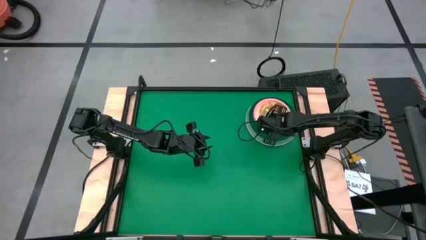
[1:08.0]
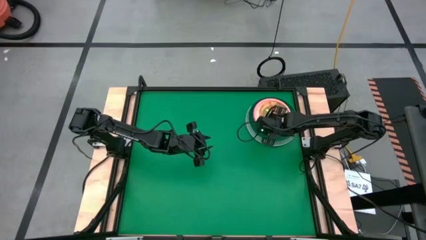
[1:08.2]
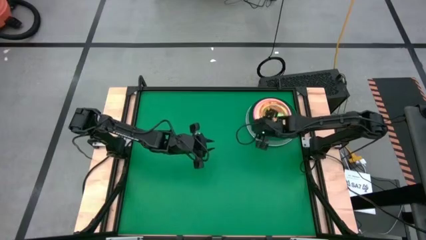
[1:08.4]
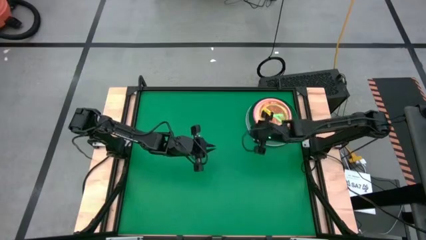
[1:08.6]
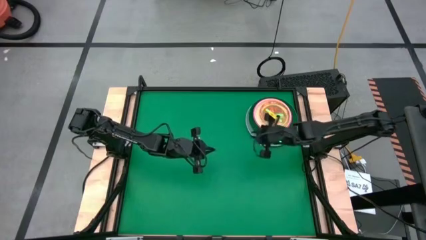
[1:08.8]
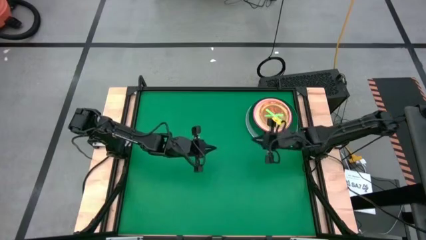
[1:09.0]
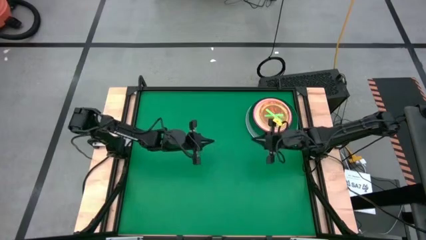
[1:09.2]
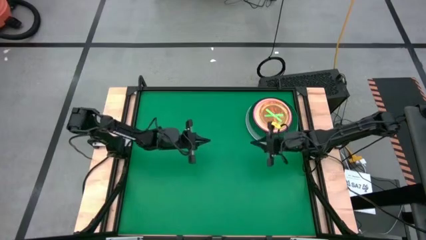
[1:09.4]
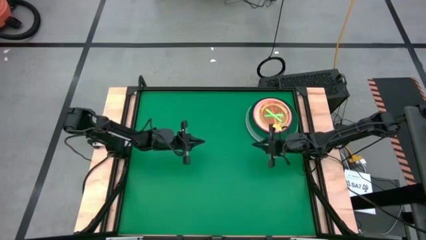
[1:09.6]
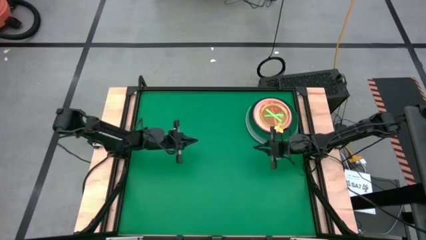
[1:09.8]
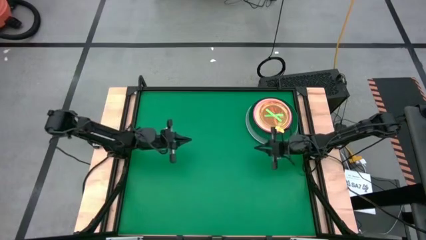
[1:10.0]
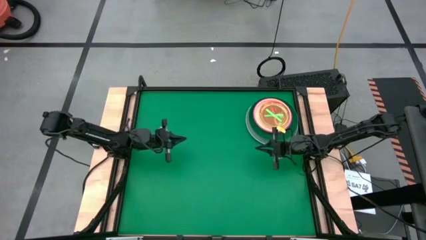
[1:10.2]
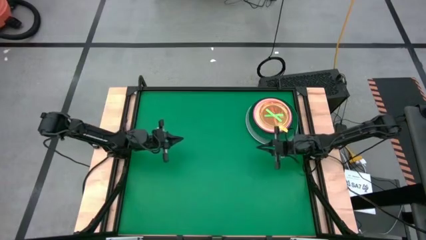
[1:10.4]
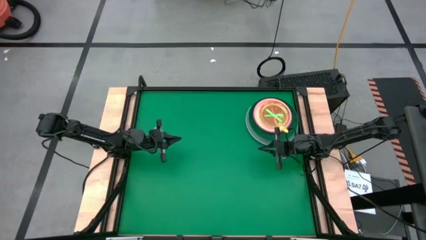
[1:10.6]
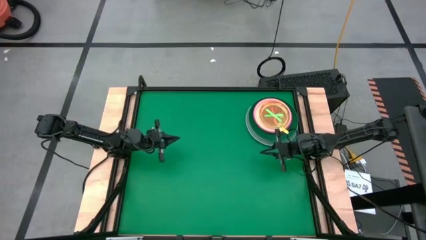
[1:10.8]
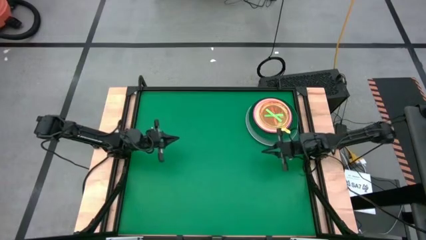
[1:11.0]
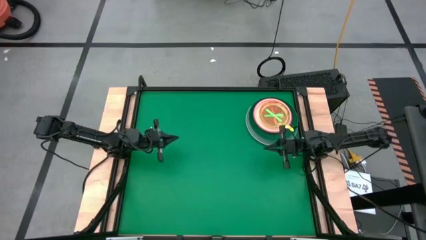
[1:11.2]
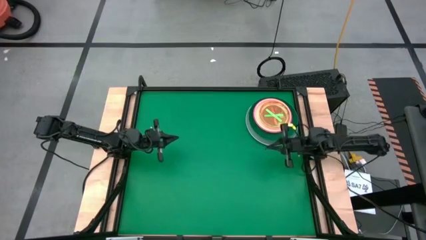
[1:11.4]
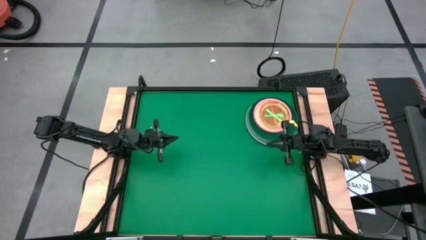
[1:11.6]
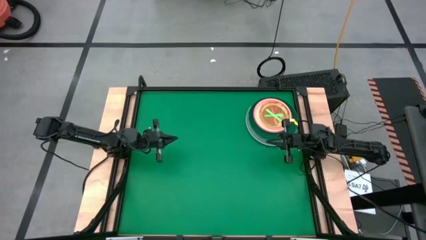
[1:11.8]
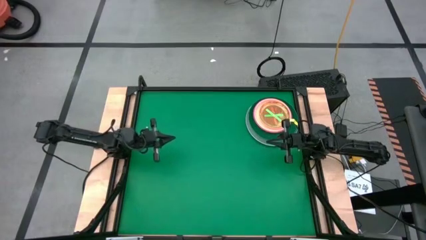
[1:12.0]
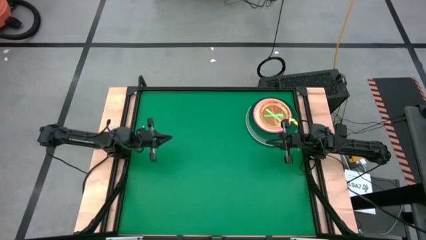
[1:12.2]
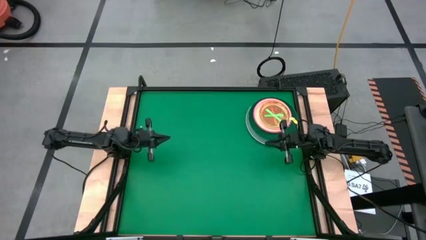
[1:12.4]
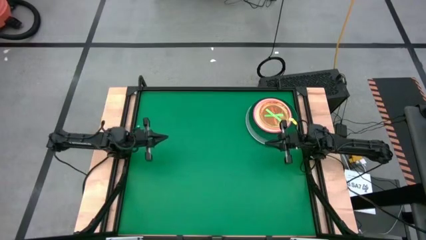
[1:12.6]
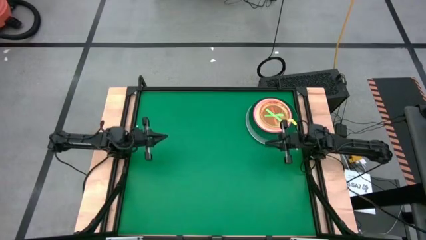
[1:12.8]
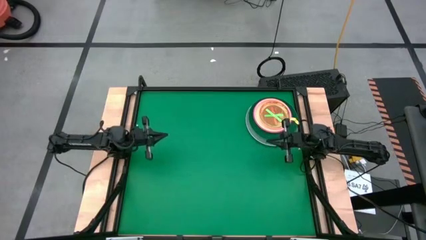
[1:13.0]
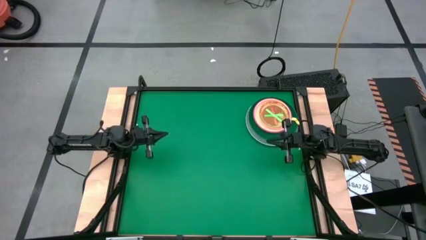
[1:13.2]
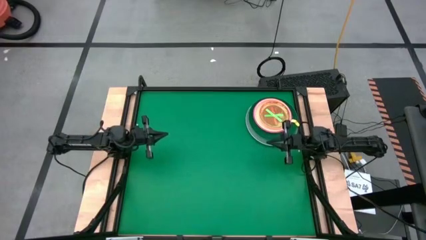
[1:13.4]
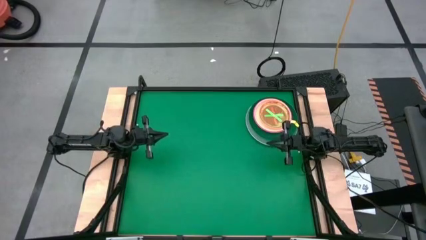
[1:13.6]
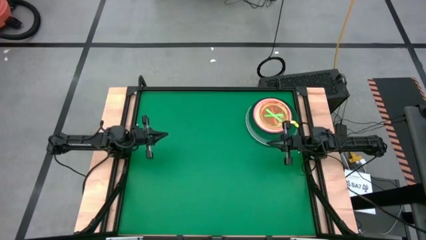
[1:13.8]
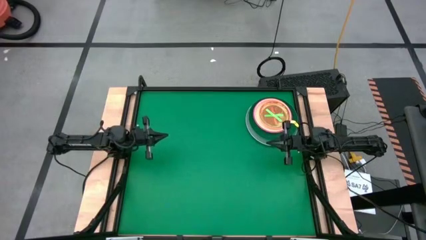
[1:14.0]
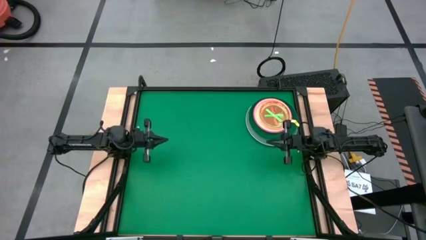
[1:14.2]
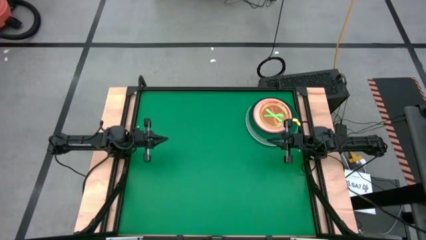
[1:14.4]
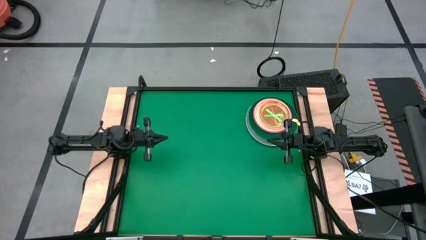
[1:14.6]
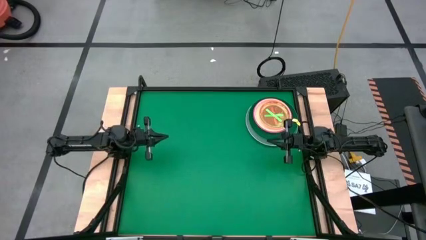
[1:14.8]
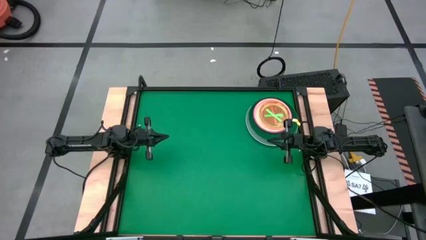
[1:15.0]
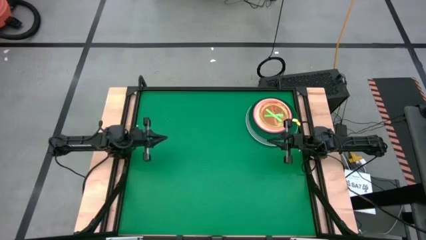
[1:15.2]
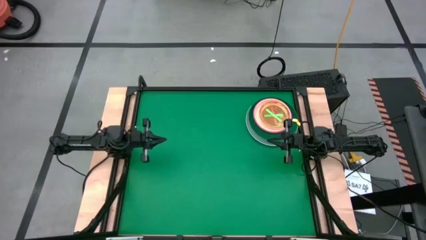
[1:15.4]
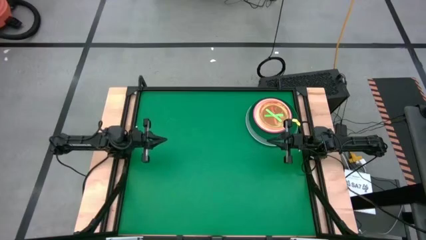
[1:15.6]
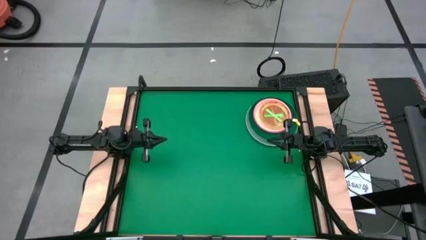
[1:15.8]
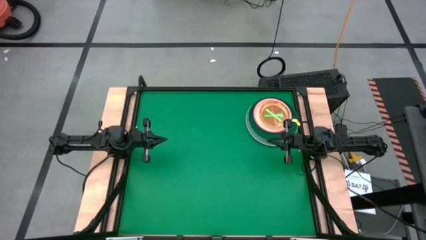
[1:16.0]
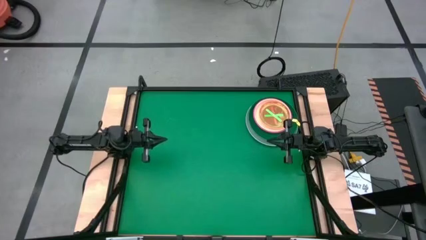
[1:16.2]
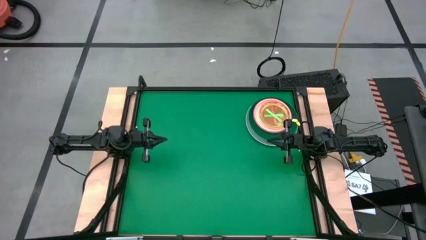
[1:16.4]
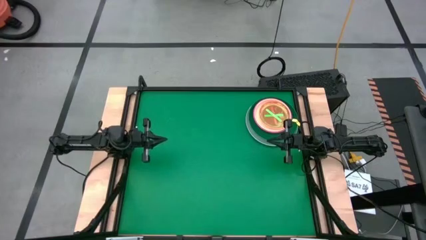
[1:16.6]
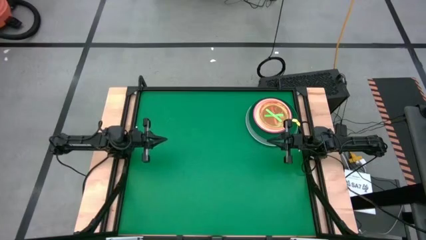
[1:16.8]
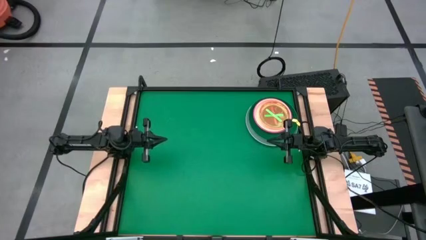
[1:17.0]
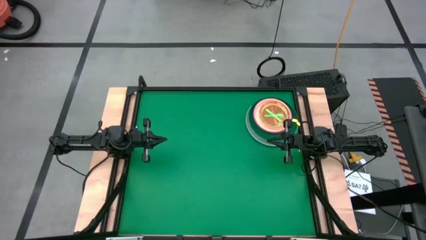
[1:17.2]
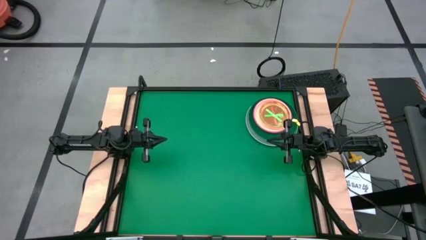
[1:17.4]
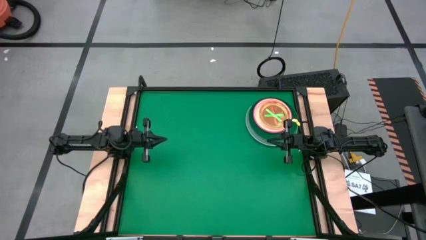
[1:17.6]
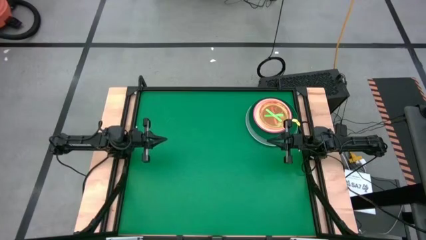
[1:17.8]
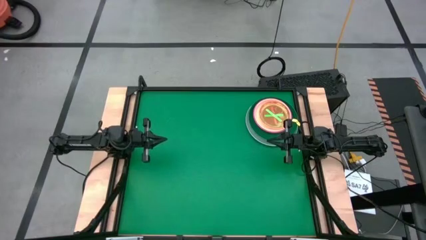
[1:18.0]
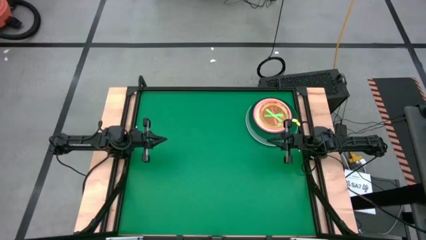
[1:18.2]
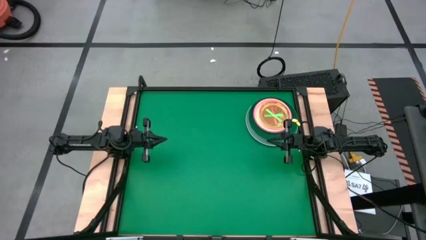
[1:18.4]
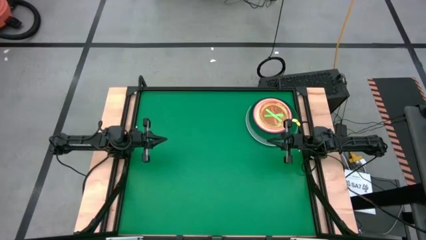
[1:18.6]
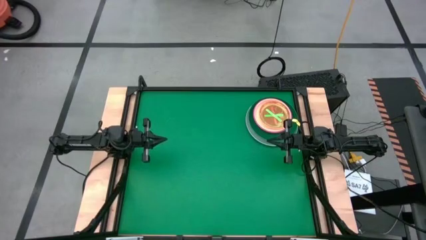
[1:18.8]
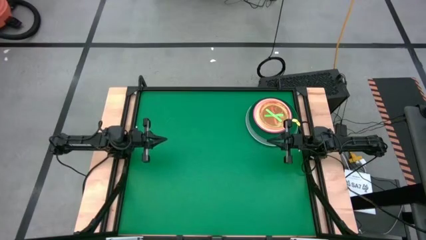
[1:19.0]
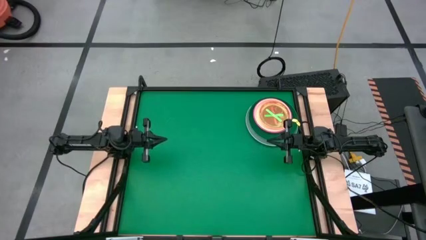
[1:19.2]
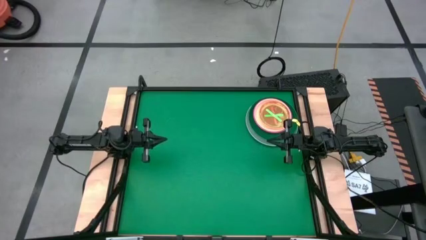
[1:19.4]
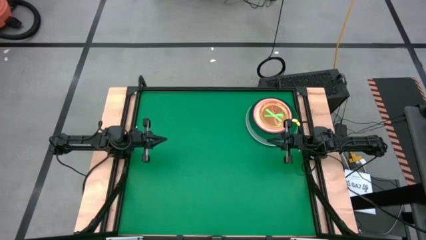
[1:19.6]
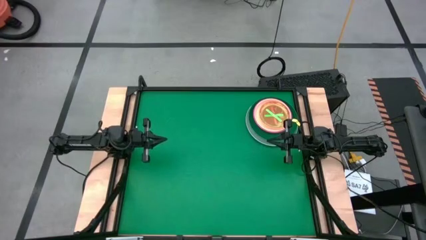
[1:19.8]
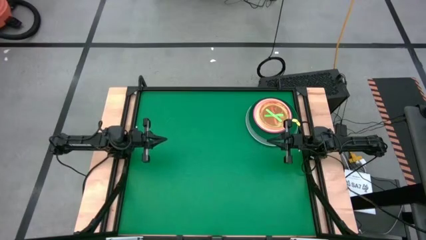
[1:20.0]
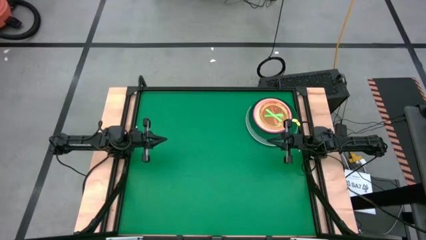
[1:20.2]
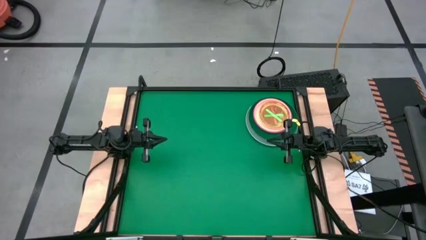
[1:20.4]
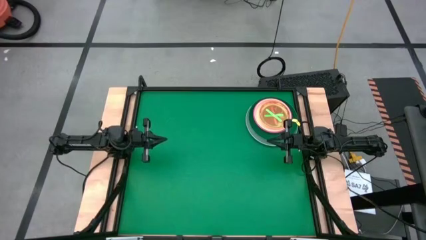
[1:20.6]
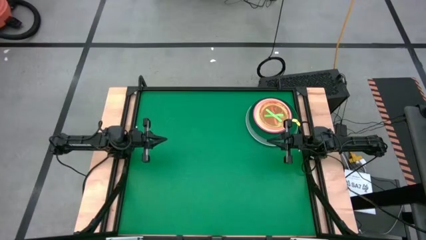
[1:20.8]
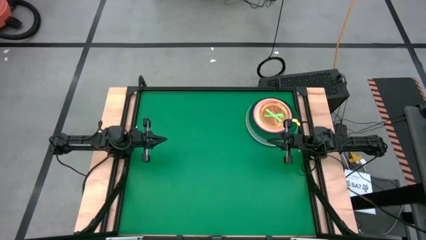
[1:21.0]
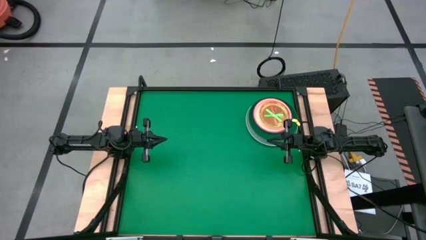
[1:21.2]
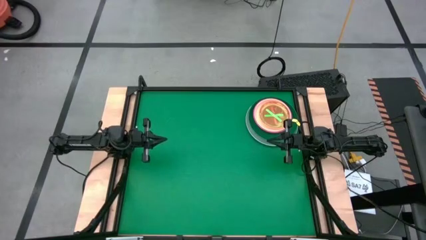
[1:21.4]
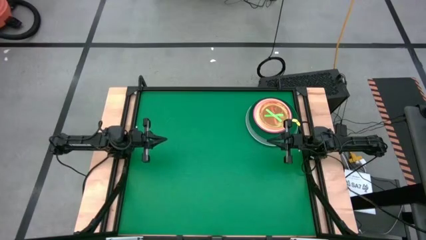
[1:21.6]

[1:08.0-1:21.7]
Task: Stack plastic plates
Return to Home Position
